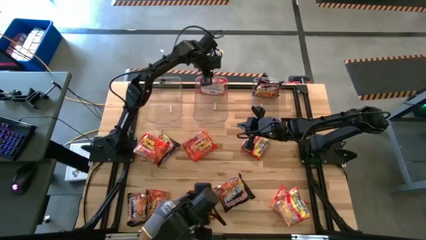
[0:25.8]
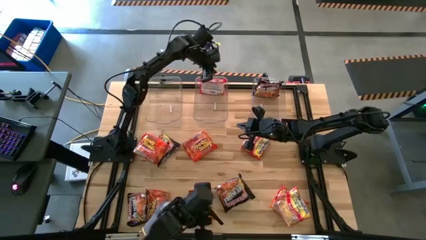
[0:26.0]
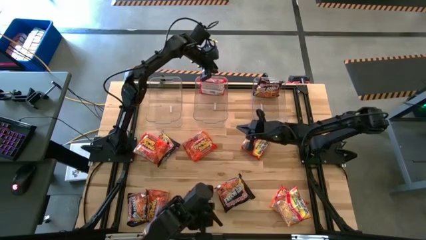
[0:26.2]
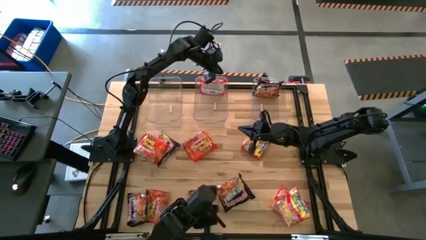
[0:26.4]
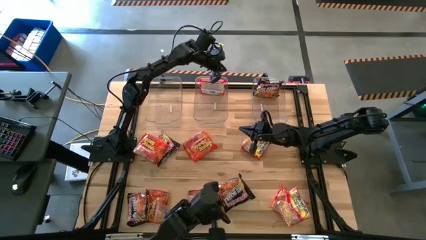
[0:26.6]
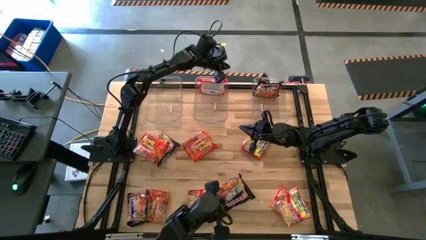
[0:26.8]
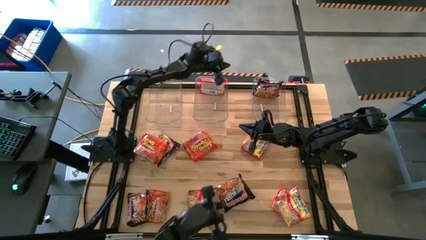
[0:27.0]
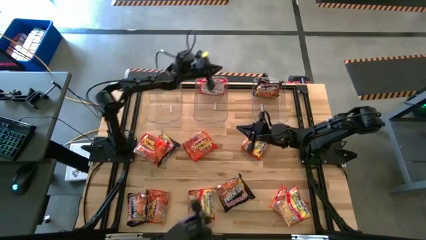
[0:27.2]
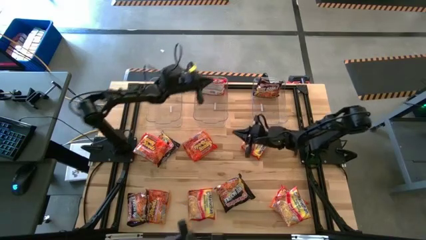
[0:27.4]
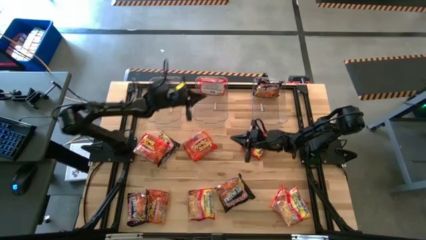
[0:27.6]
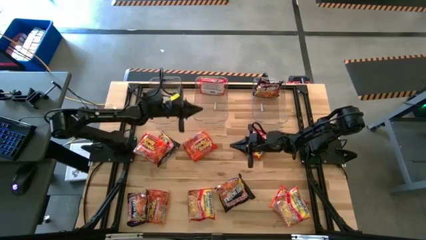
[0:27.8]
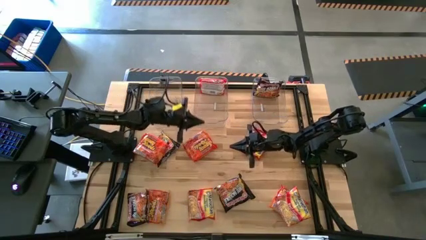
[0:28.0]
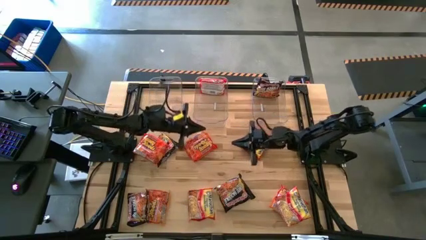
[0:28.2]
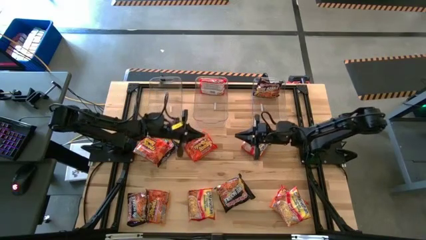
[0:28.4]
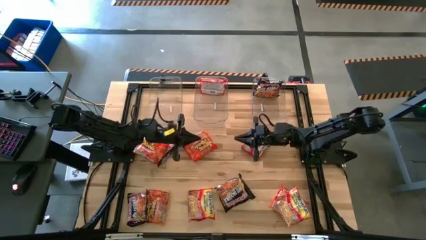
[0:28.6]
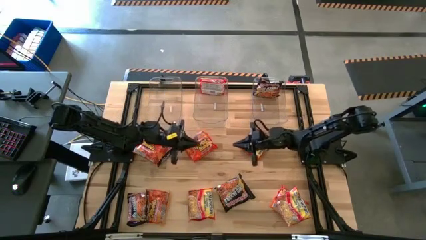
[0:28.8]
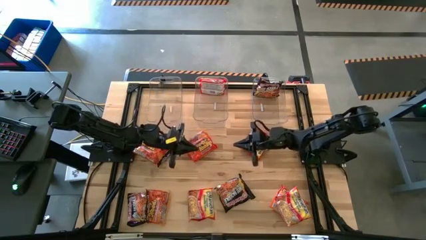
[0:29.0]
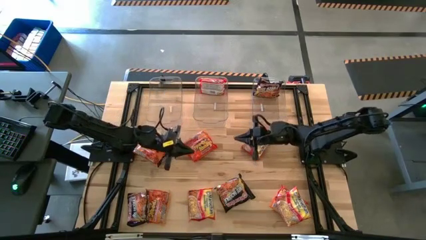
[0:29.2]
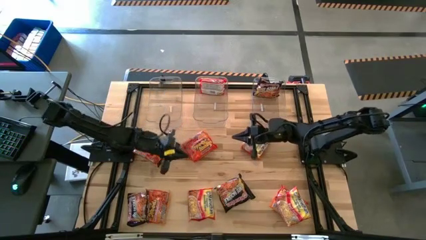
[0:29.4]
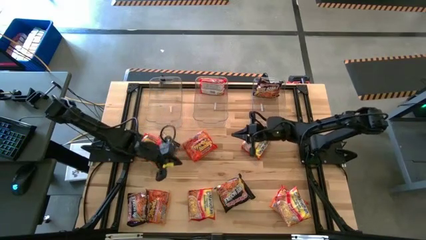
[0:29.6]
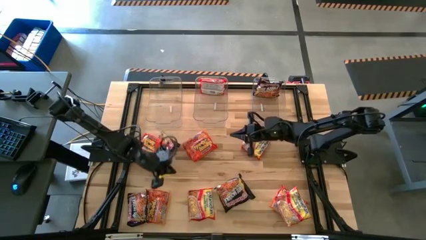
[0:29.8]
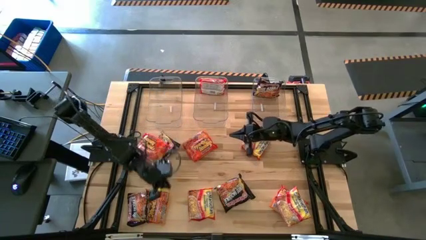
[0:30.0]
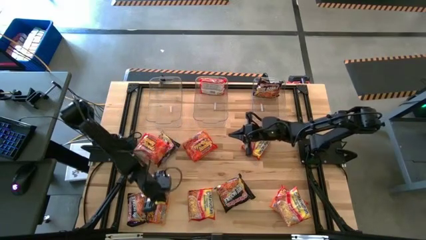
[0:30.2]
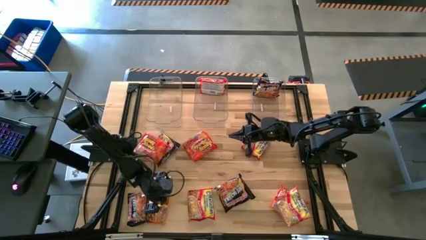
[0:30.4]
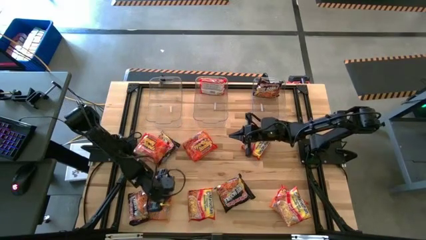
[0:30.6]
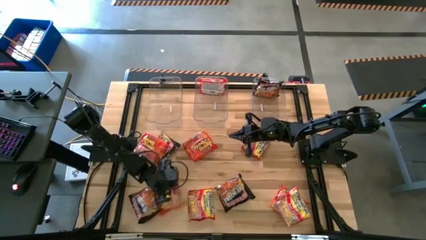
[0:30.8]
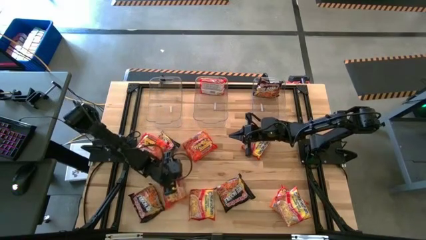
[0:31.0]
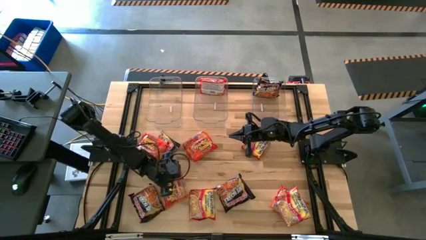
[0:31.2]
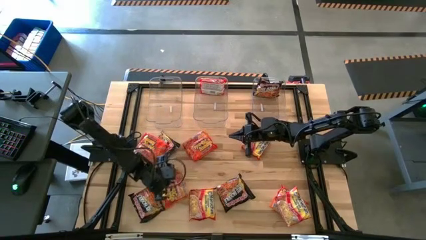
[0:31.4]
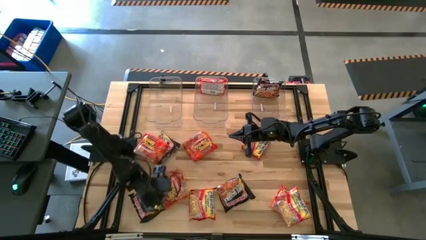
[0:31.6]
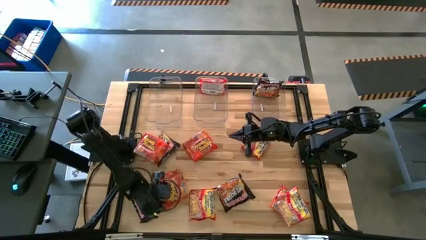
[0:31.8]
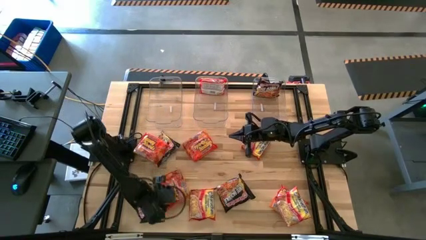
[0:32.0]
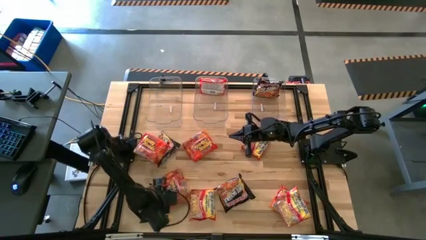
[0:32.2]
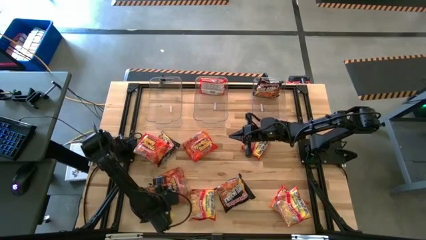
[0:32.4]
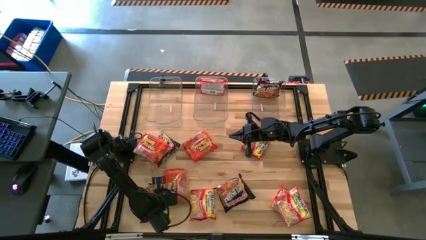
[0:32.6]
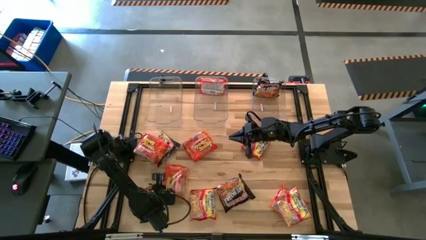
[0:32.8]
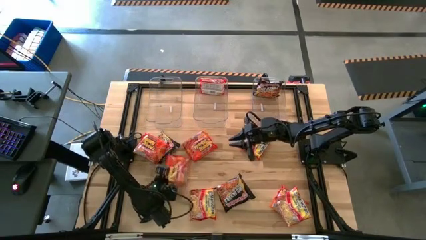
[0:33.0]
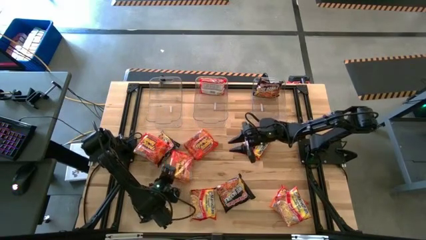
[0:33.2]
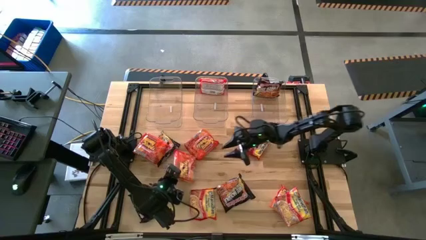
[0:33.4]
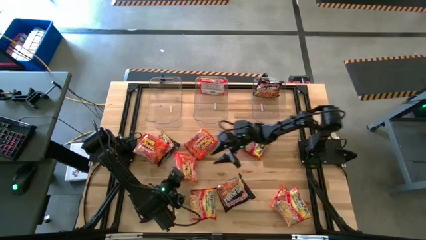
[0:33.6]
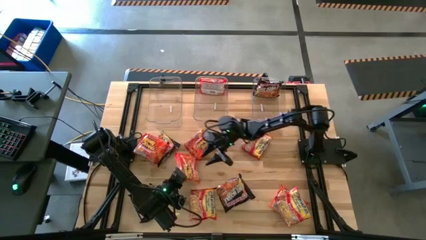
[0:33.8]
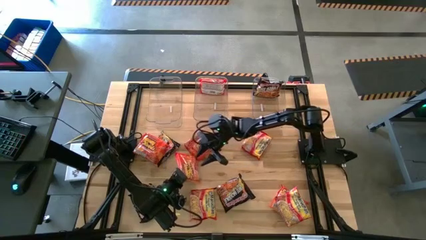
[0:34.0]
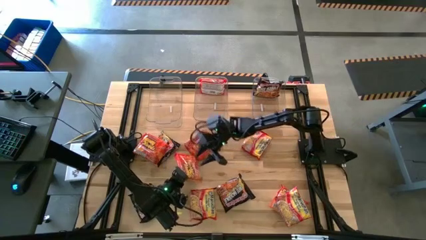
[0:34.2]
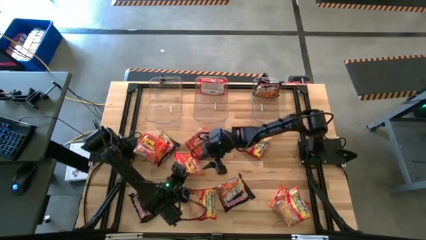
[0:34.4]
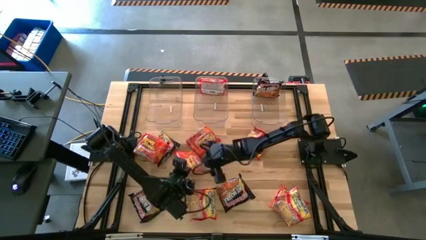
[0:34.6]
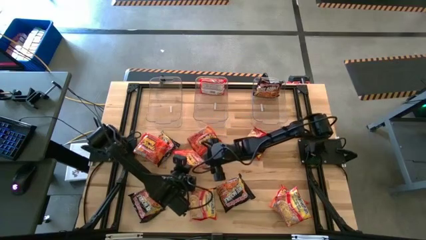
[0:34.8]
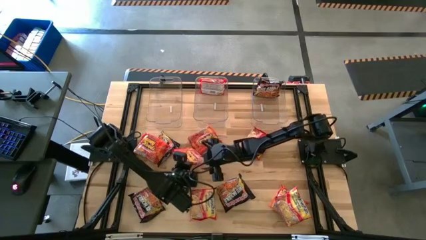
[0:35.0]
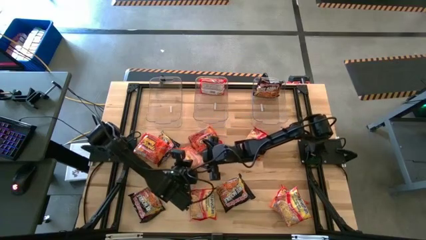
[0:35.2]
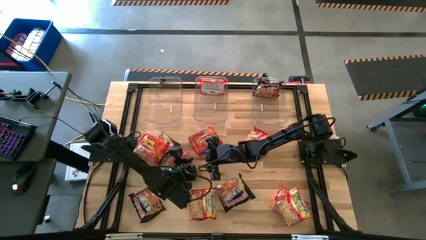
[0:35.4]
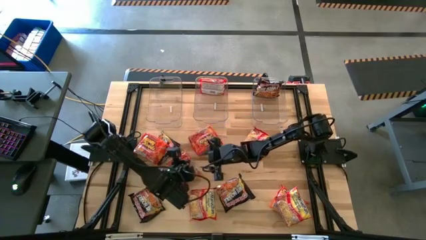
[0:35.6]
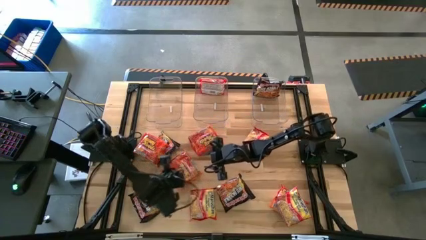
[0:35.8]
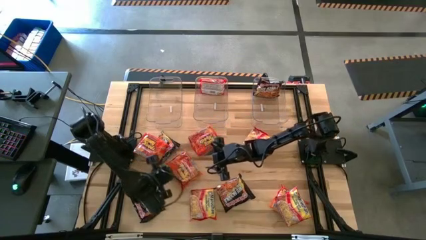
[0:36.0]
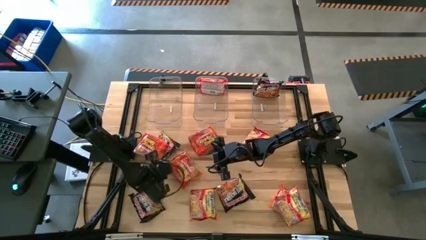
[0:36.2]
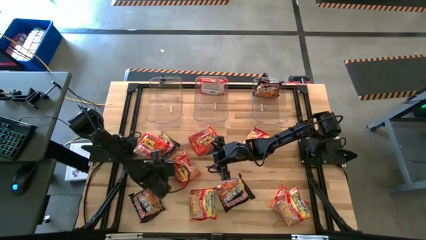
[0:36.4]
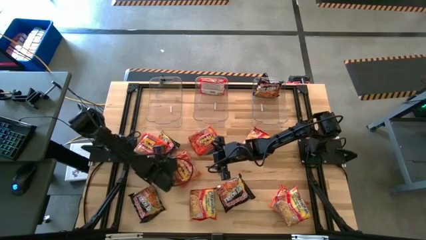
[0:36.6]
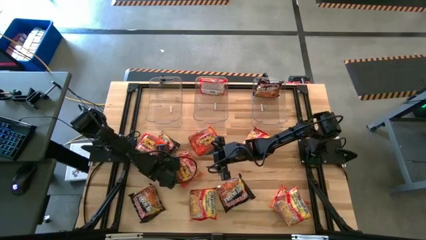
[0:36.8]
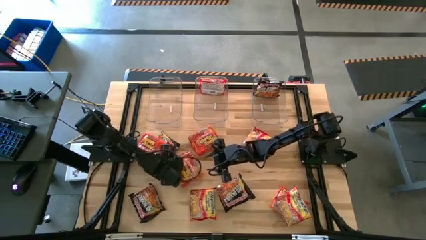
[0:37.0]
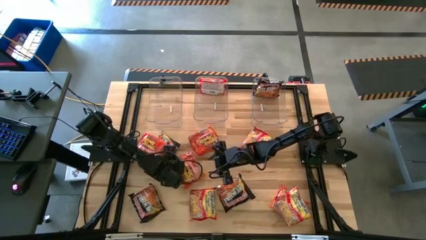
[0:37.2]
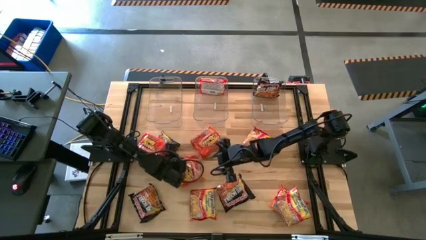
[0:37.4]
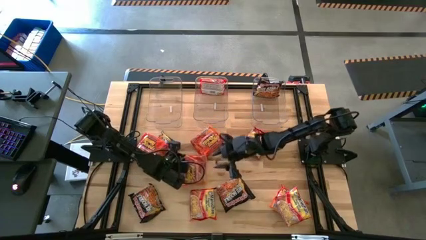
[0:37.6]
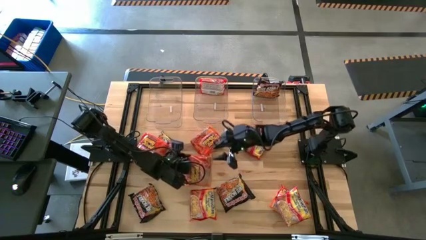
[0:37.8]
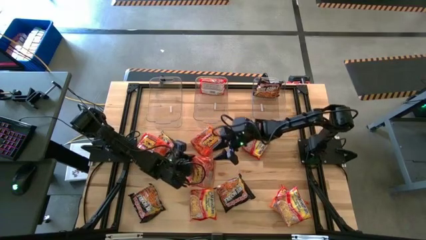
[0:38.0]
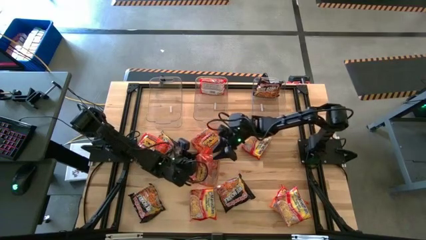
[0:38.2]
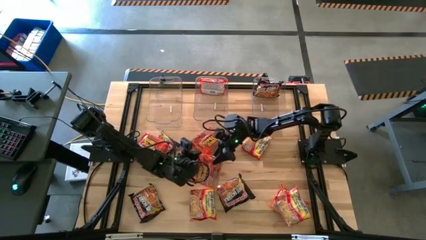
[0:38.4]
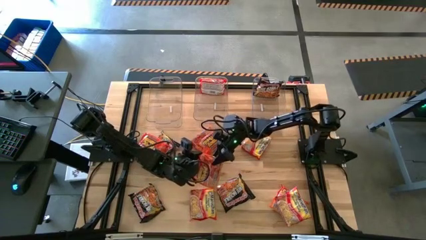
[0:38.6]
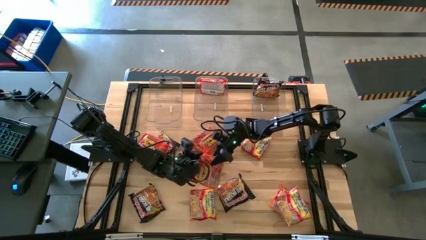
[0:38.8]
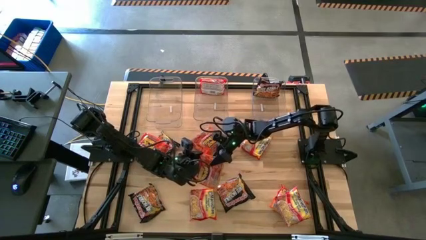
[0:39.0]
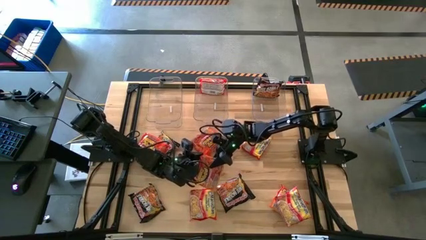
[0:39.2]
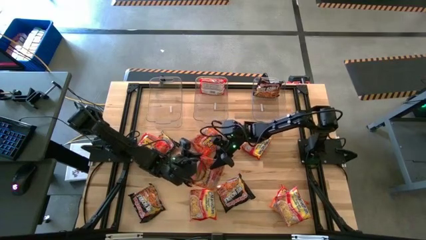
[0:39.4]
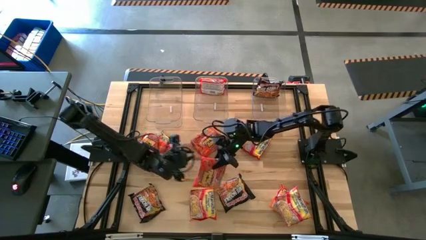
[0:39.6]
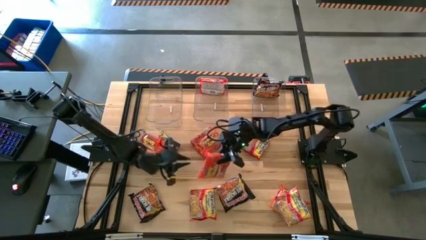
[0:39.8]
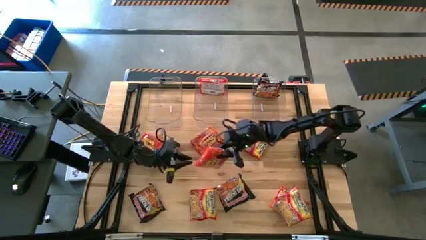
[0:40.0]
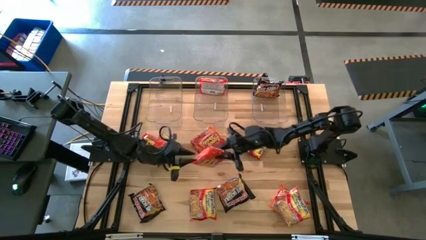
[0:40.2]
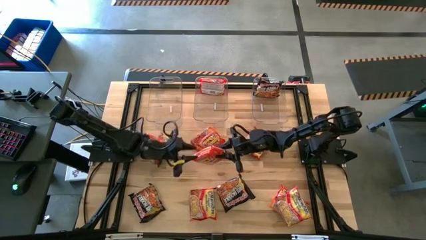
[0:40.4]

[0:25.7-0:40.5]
Task: Sort Maruchan noodles
Put the orange noodle pack into the left transparent bin
